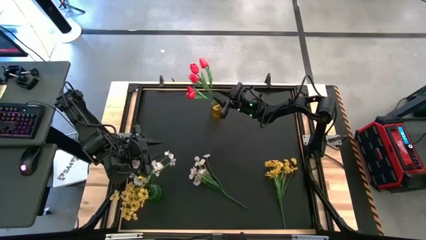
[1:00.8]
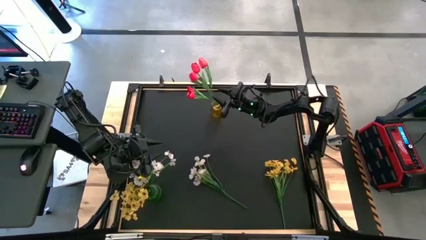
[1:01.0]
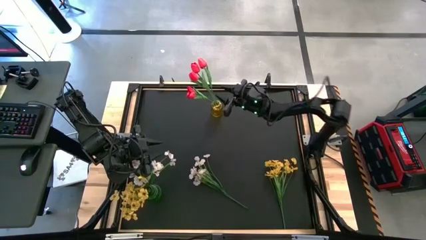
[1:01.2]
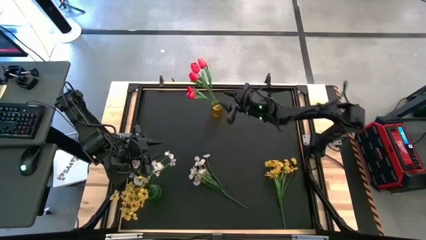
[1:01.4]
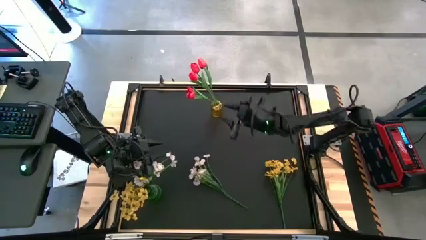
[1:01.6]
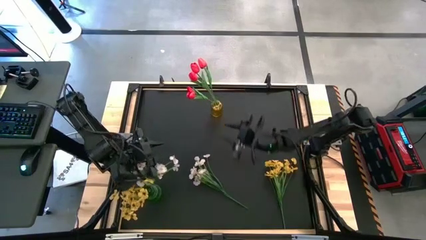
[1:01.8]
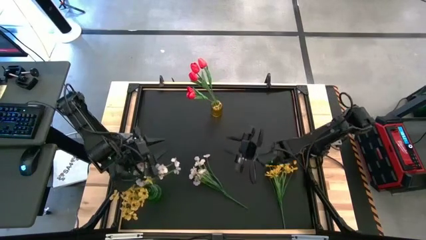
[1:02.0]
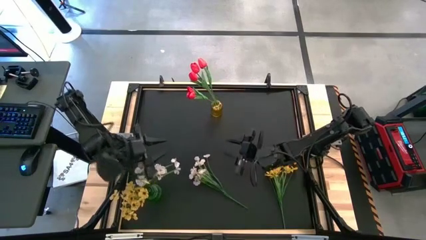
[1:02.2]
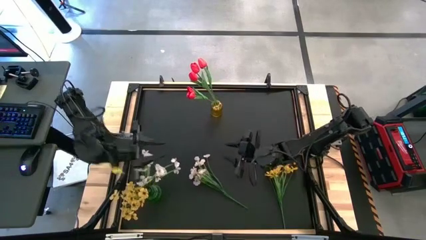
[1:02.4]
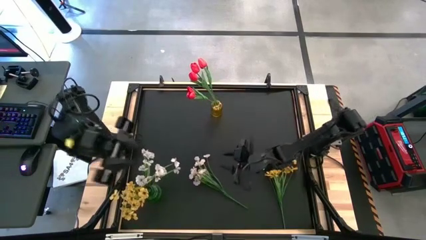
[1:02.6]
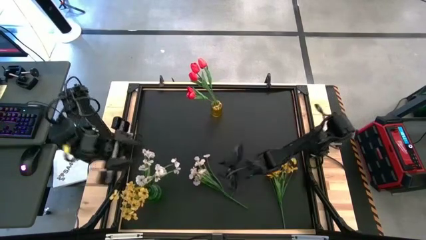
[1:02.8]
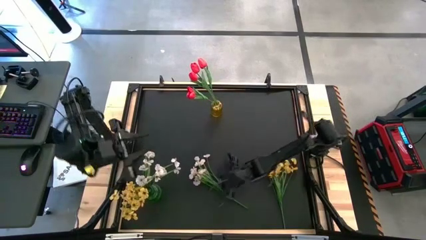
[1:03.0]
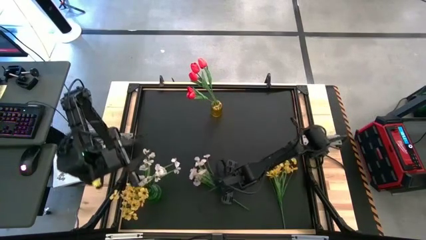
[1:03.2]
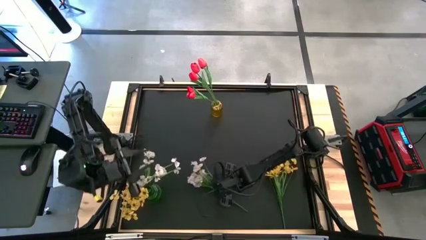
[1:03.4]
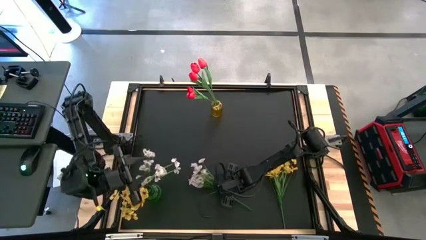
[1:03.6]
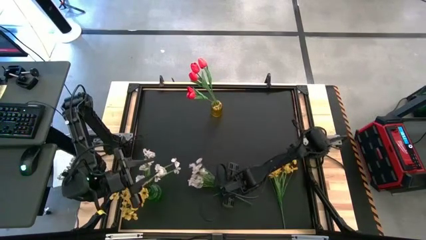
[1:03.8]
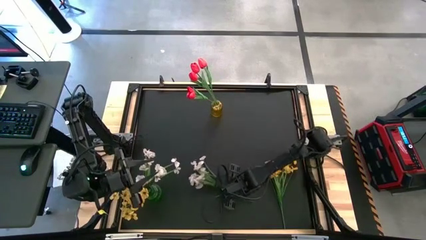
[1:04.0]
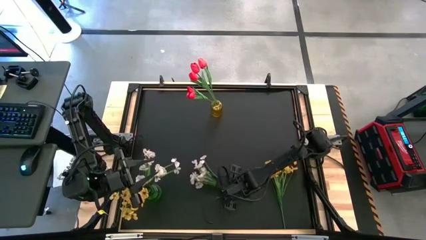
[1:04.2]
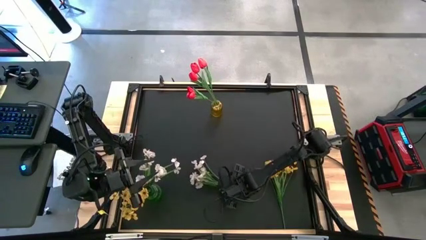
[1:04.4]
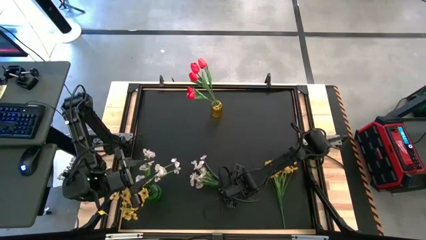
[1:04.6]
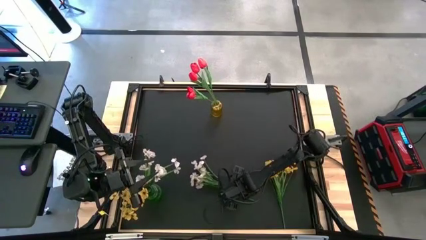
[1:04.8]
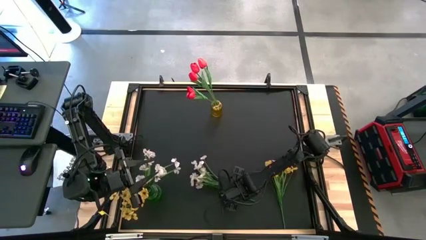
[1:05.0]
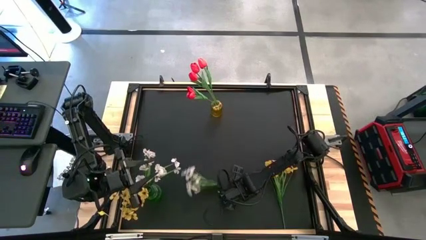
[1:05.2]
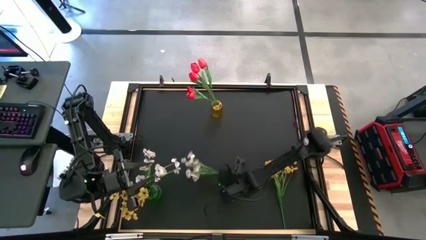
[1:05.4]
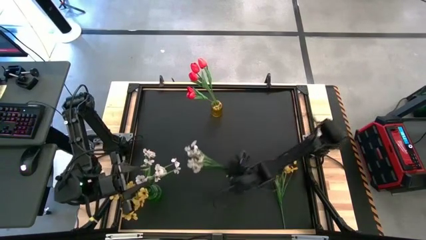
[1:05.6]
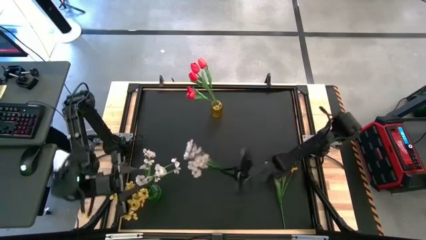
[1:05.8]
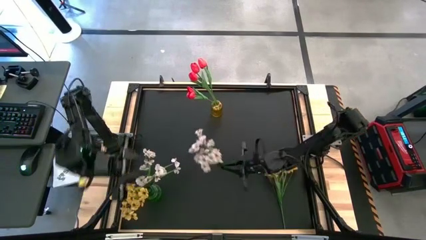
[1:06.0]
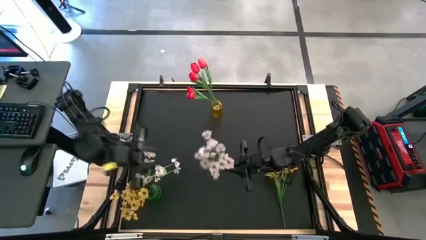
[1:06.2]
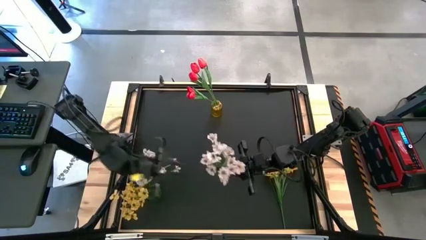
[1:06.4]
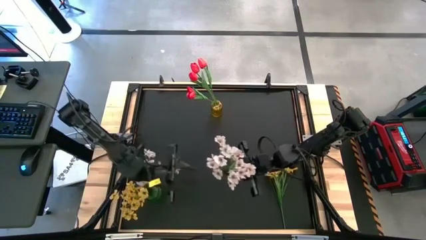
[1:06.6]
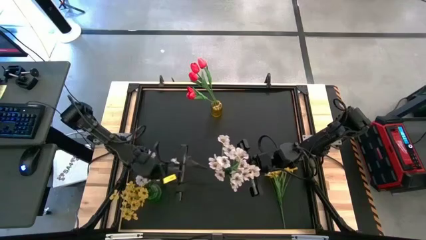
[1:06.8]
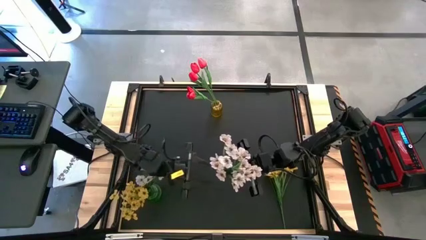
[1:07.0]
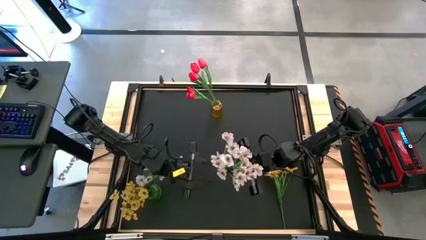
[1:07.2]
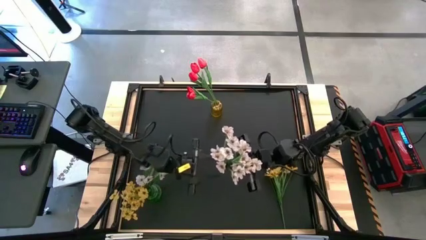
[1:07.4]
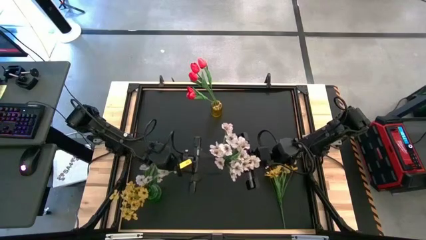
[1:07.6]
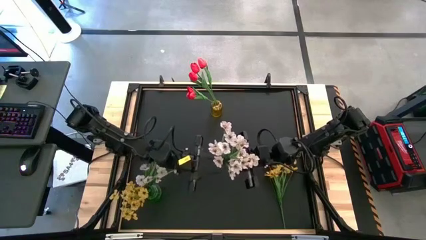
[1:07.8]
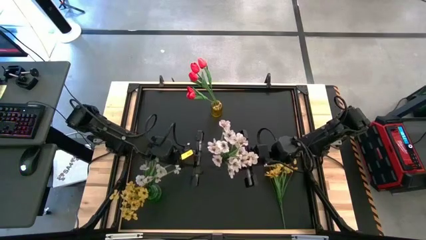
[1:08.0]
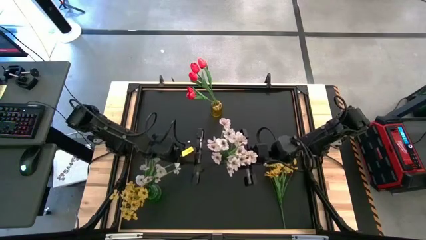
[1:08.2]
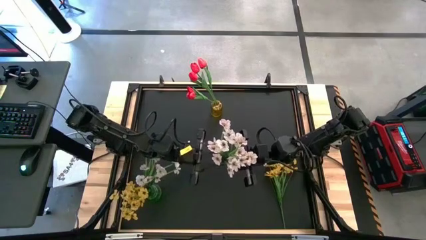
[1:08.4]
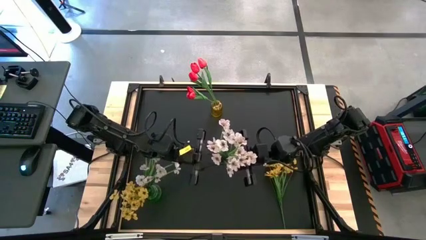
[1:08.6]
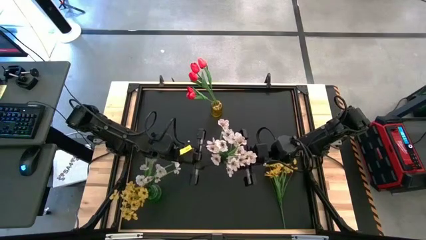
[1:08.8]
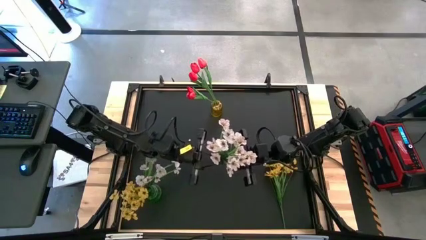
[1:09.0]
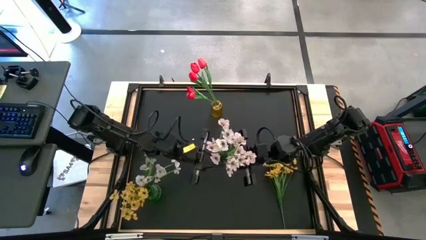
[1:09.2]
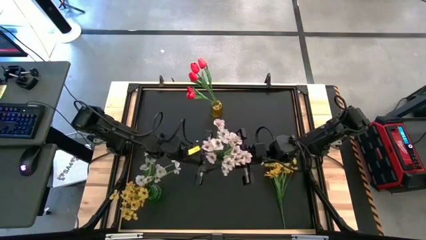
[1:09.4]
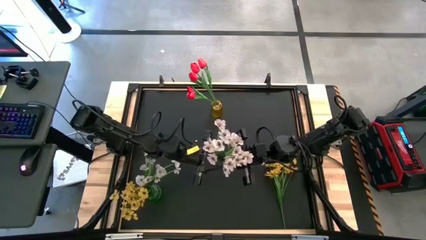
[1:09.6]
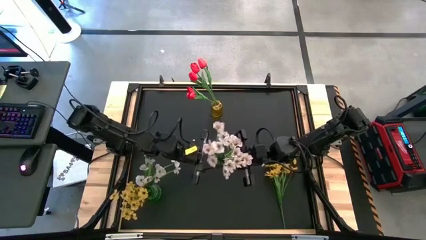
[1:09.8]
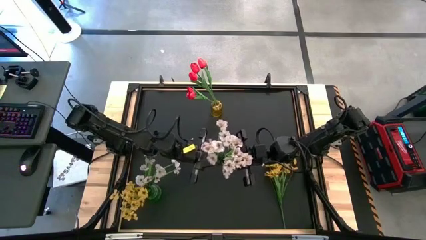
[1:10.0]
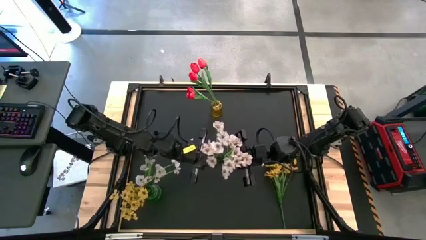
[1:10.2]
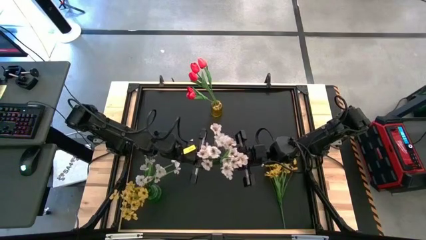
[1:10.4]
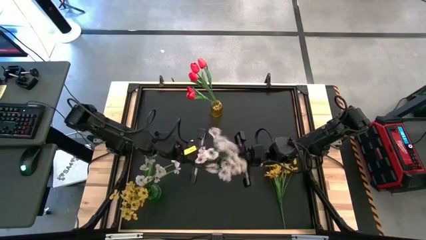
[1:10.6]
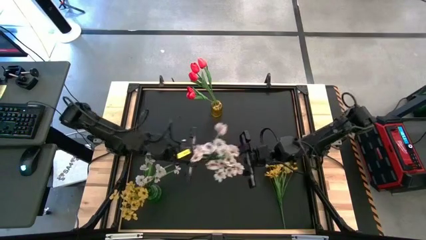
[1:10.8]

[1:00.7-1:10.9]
Task: Sort flowers into vase by color
Put the white flowers into the green vase

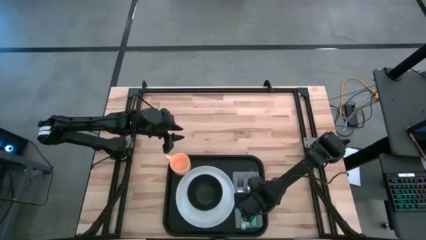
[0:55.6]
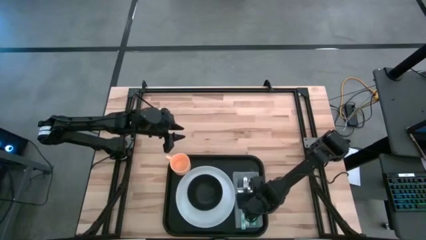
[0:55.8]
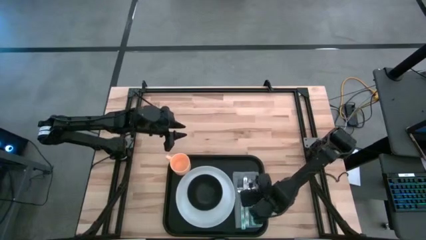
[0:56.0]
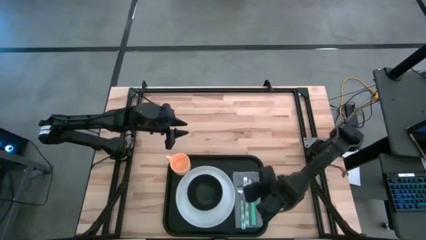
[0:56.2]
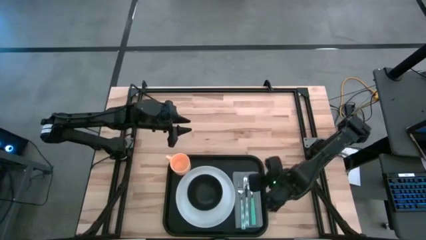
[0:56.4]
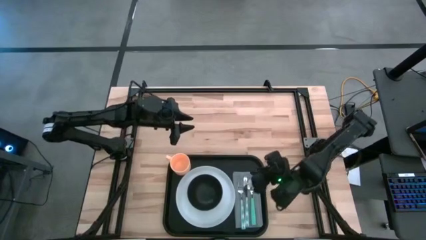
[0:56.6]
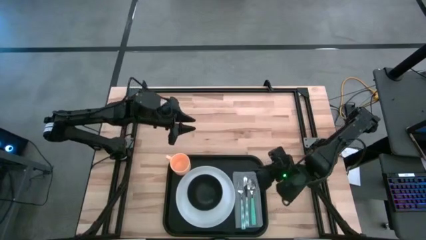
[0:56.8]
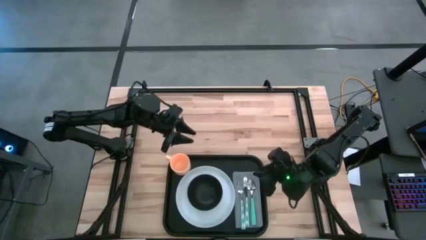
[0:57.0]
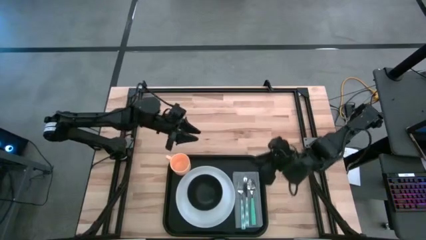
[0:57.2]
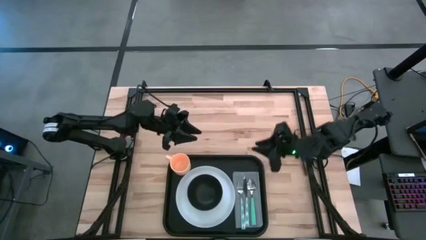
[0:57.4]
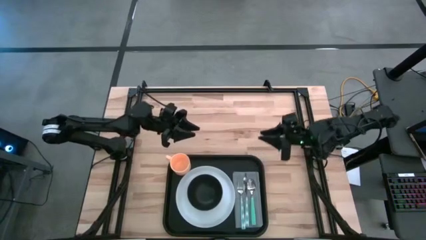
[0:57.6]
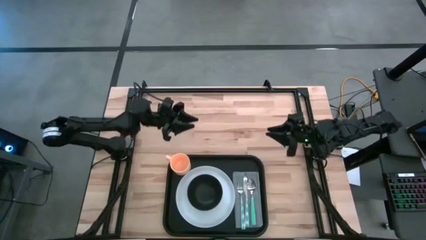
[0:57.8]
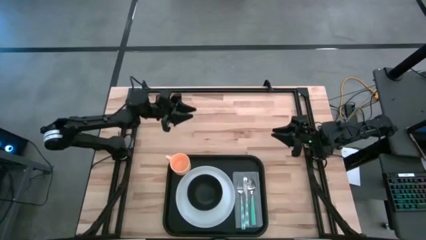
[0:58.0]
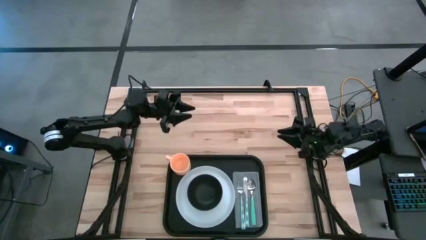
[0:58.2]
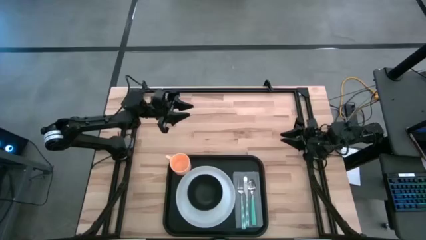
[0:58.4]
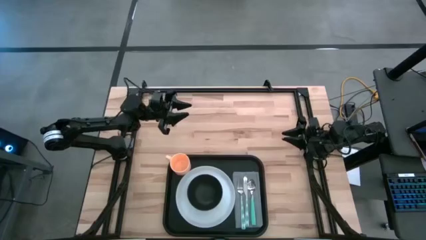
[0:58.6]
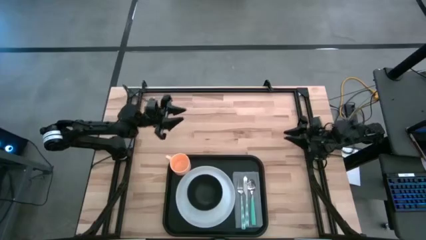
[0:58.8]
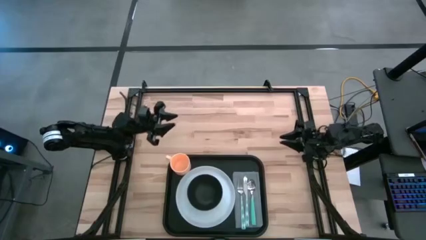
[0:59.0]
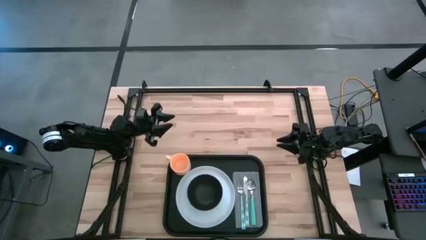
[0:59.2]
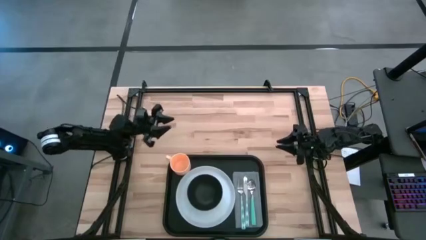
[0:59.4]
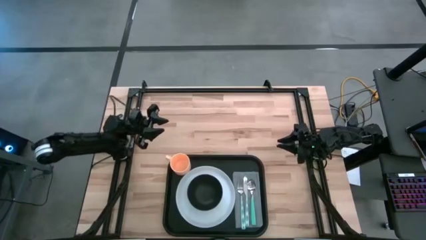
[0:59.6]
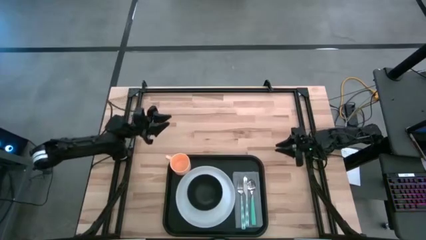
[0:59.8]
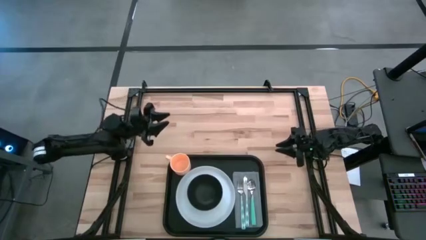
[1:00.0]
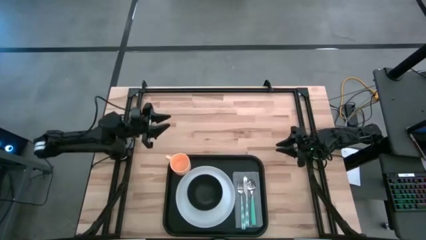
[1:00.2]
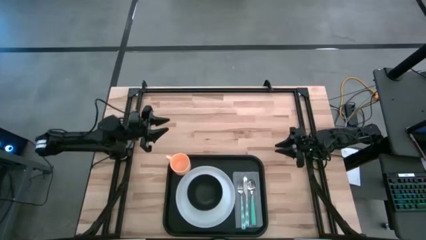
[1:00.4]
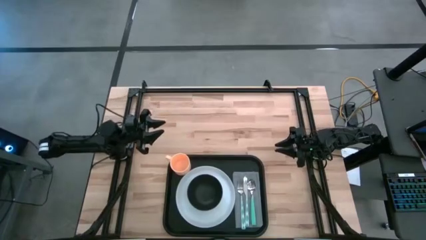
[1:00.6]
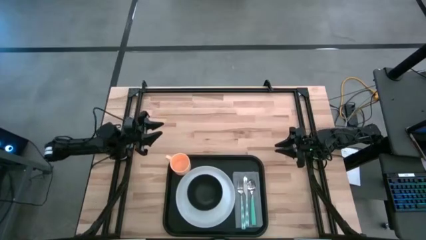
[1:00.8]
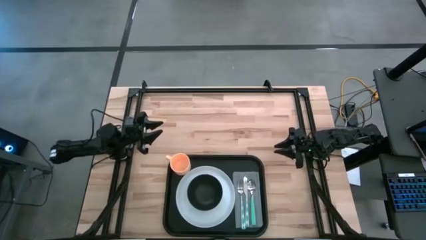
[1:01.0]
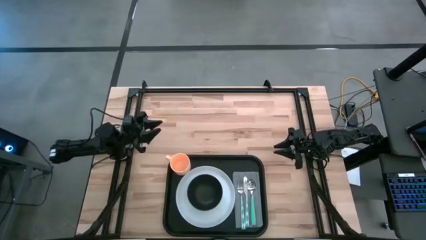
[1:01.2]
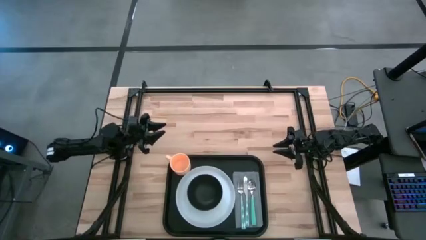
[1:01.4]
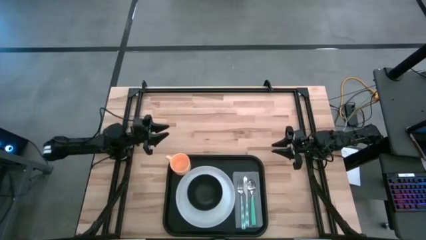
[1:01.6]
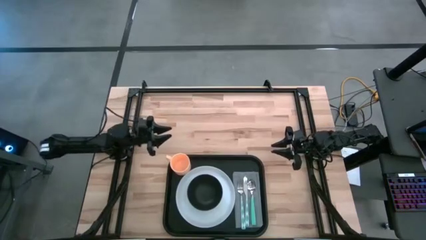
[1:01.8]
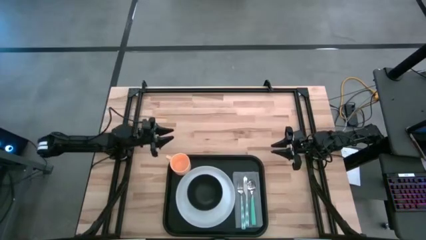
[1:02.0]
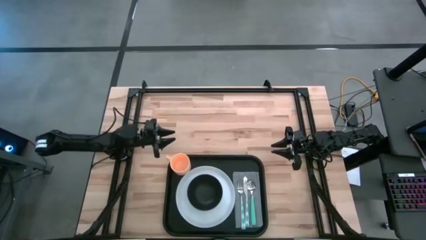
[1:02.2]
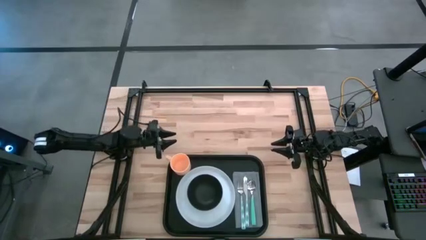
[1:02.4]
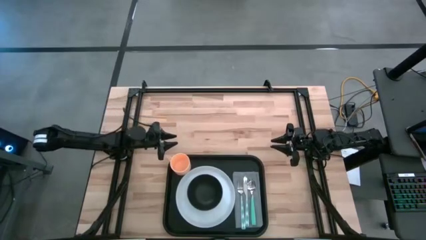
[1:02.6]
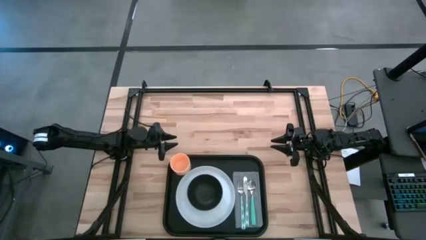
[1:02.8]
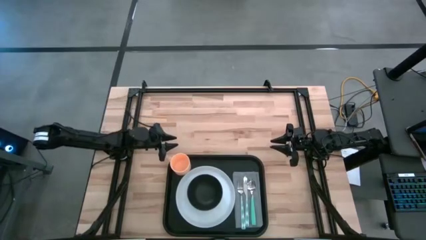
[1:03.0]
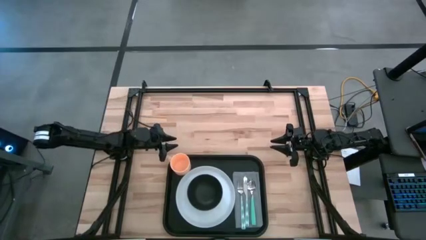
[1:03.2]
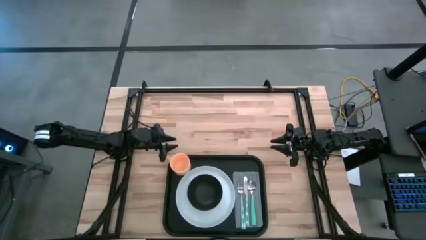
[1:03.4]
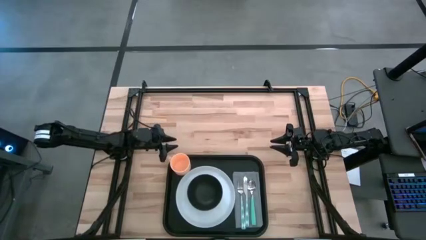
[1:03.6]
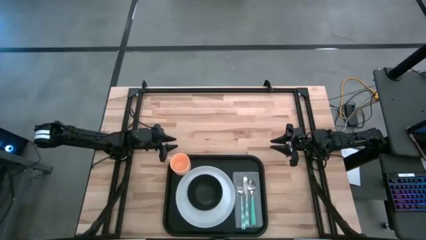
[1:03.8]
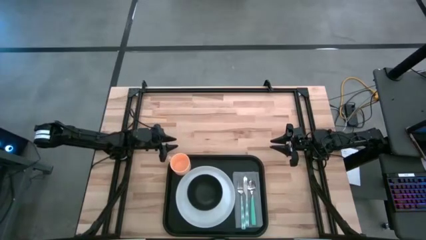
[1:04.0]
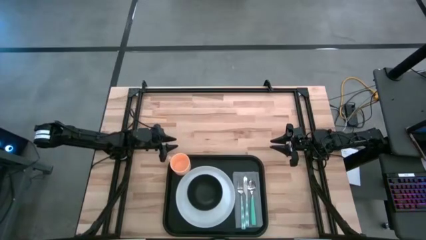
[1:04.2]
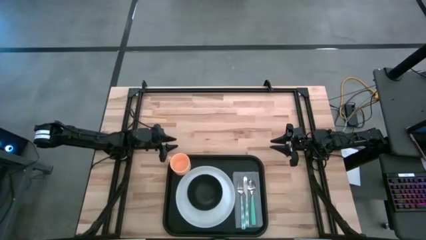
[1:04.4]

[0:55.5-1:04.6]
Task: Set up tray
Return to Home Position
